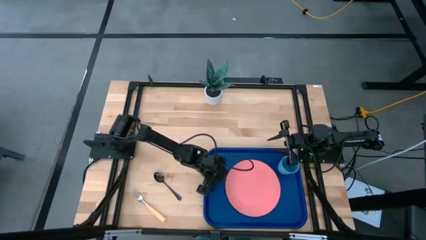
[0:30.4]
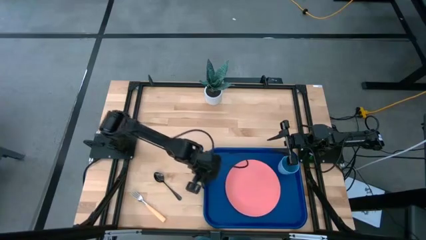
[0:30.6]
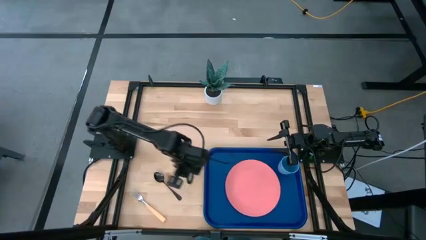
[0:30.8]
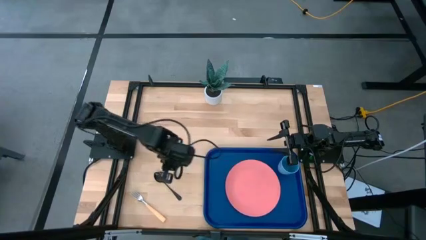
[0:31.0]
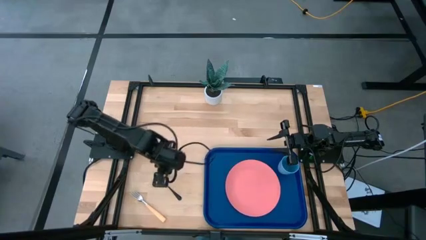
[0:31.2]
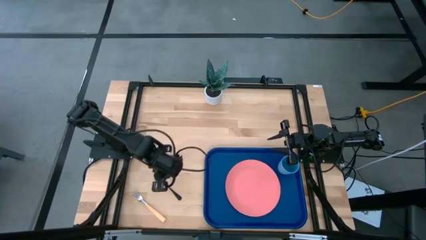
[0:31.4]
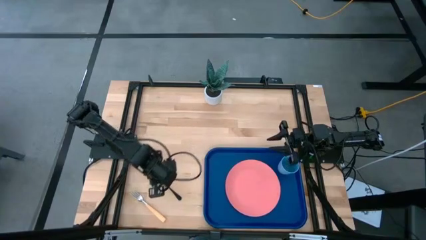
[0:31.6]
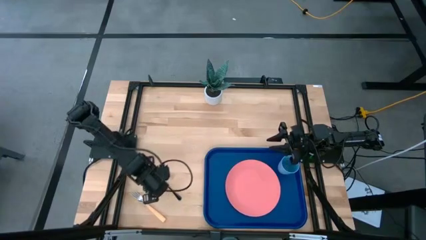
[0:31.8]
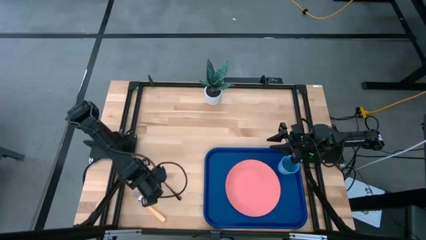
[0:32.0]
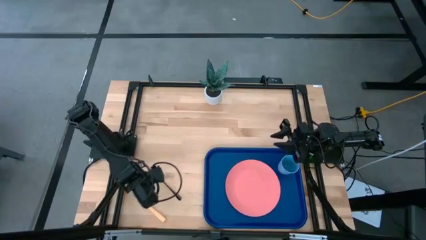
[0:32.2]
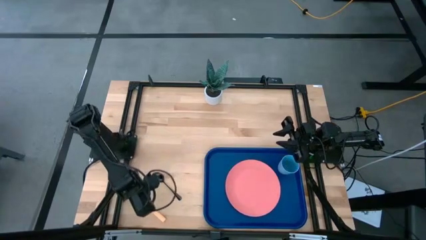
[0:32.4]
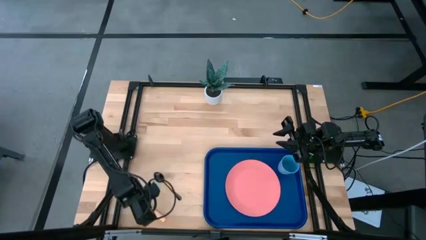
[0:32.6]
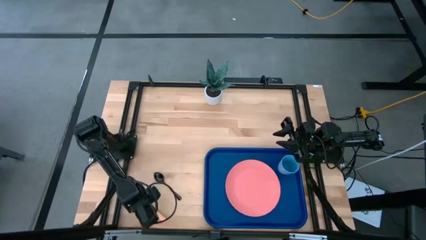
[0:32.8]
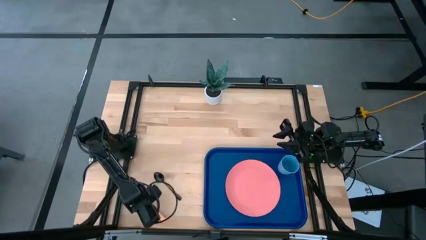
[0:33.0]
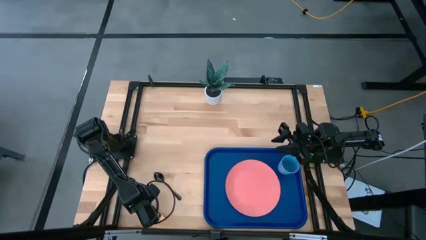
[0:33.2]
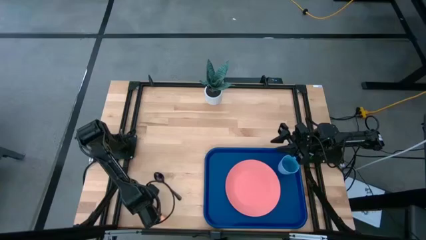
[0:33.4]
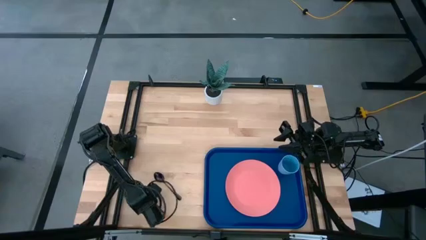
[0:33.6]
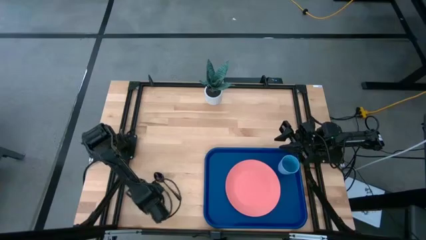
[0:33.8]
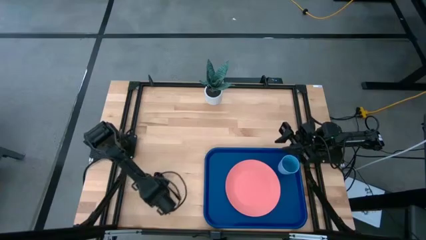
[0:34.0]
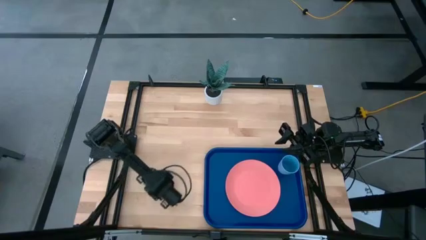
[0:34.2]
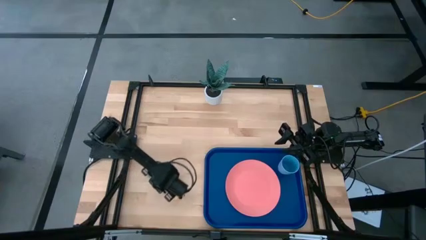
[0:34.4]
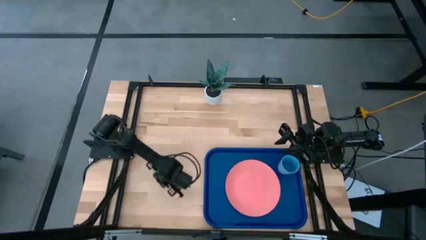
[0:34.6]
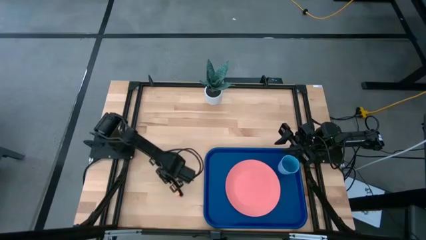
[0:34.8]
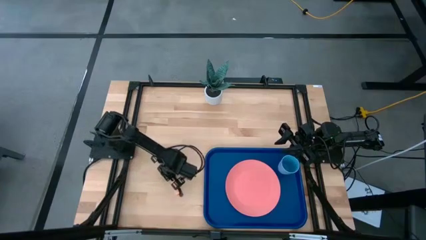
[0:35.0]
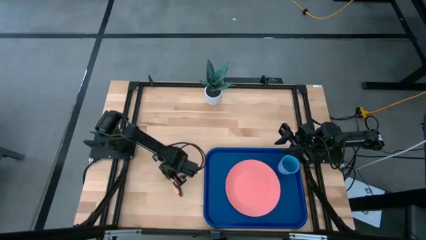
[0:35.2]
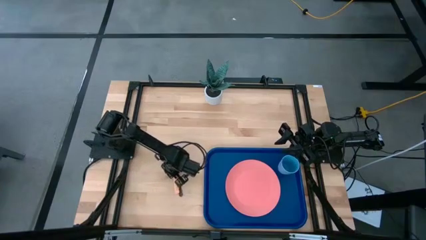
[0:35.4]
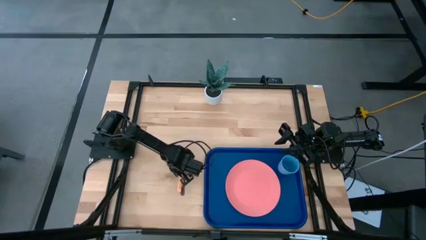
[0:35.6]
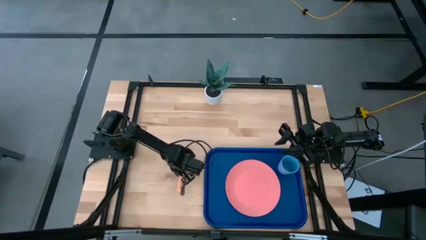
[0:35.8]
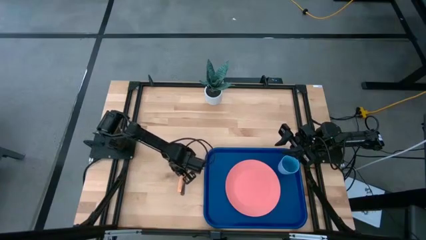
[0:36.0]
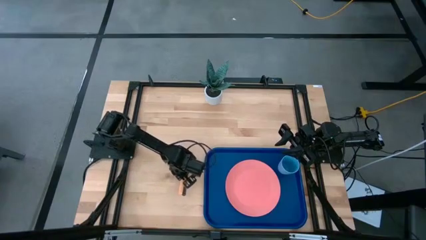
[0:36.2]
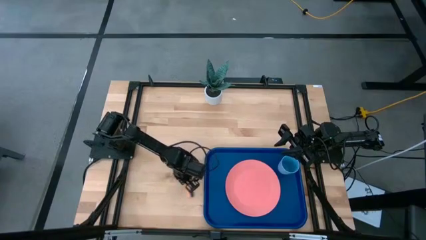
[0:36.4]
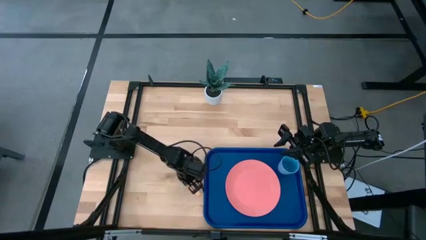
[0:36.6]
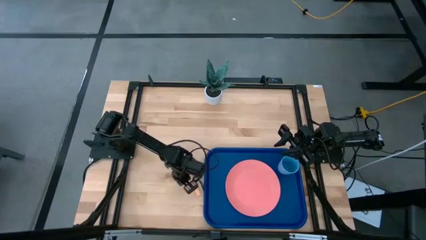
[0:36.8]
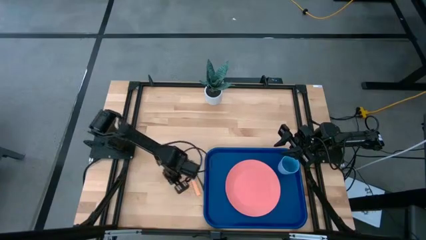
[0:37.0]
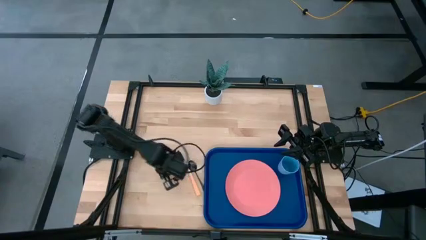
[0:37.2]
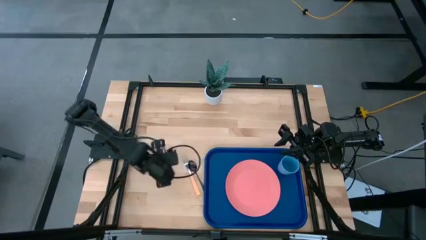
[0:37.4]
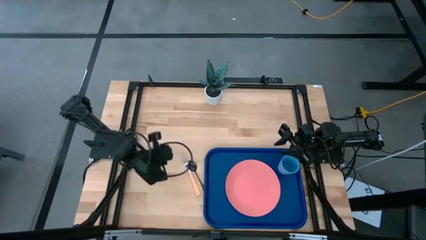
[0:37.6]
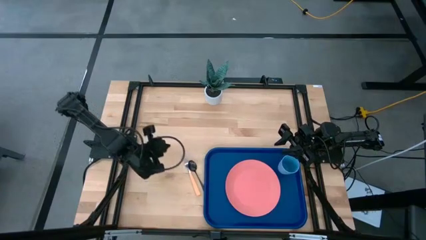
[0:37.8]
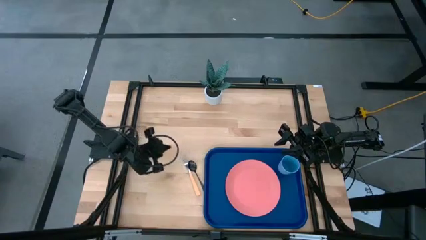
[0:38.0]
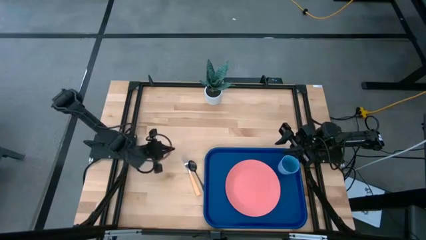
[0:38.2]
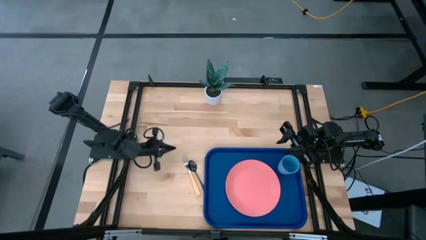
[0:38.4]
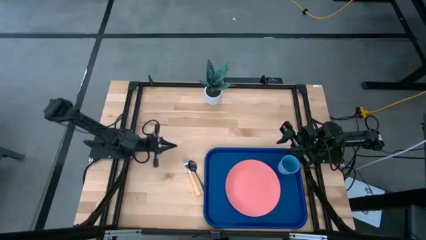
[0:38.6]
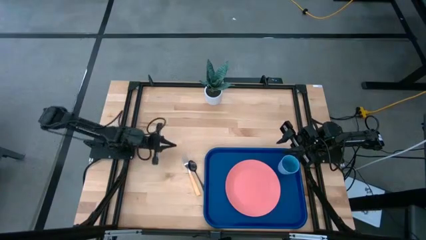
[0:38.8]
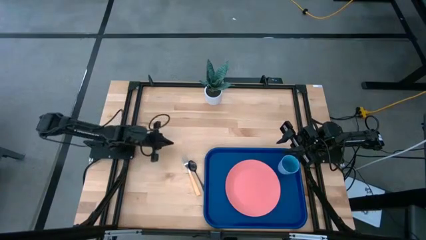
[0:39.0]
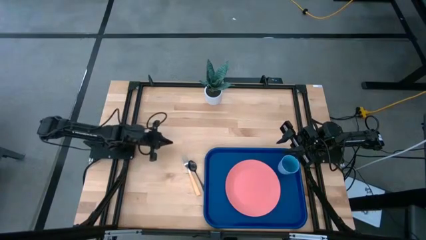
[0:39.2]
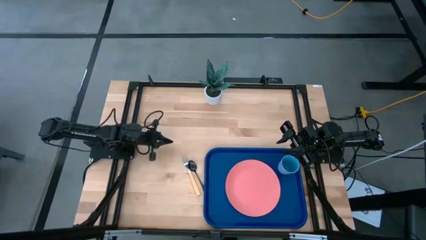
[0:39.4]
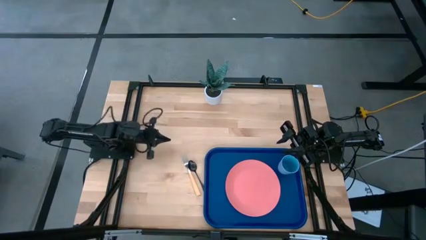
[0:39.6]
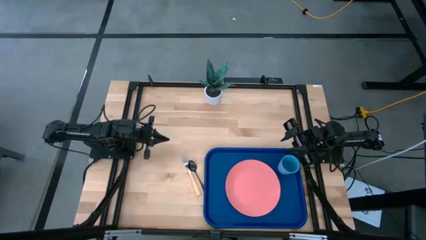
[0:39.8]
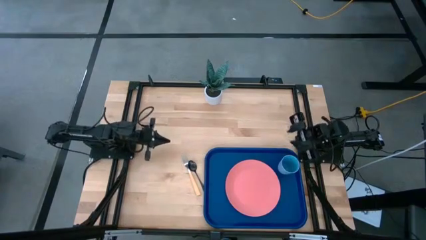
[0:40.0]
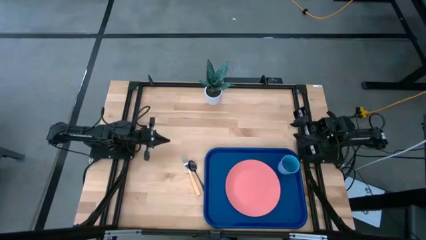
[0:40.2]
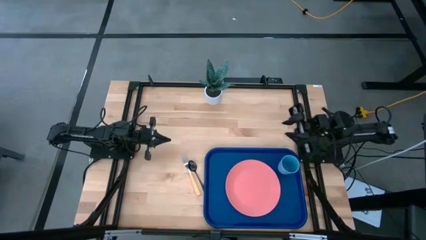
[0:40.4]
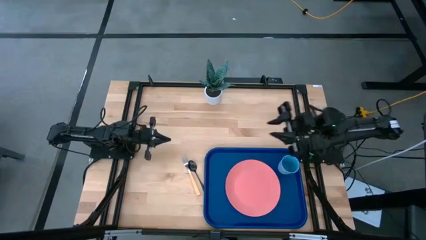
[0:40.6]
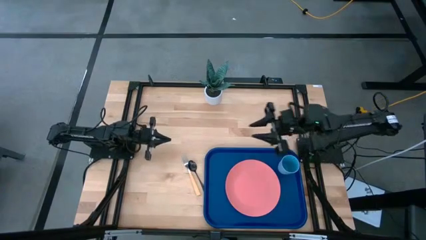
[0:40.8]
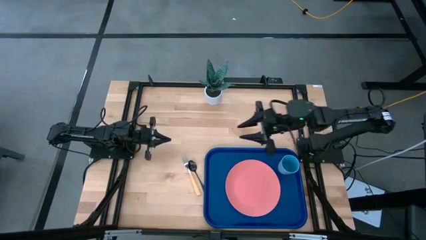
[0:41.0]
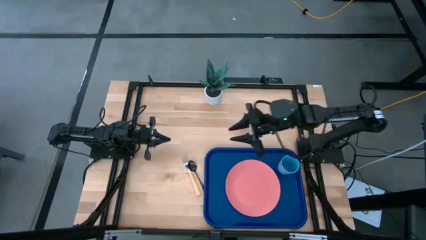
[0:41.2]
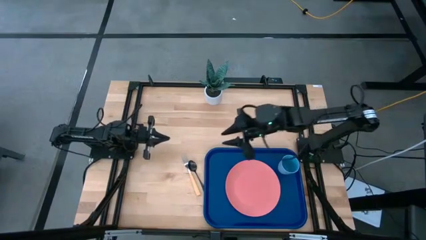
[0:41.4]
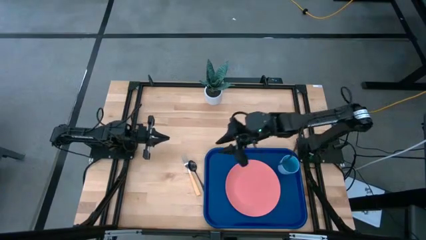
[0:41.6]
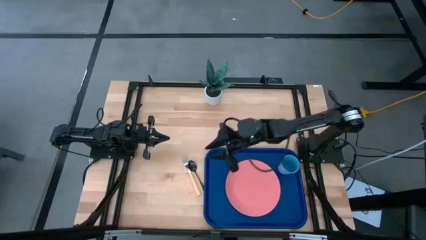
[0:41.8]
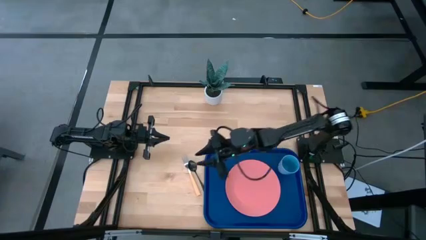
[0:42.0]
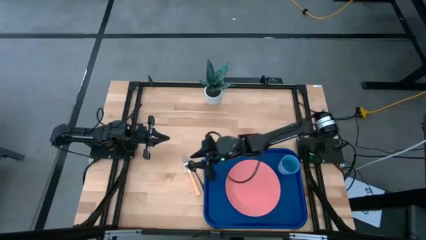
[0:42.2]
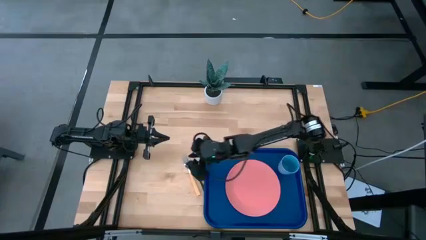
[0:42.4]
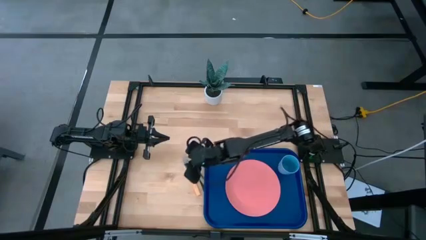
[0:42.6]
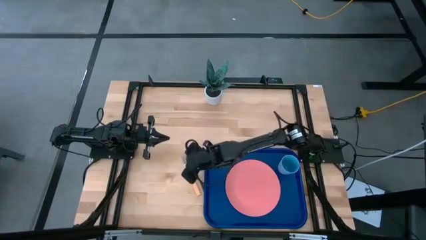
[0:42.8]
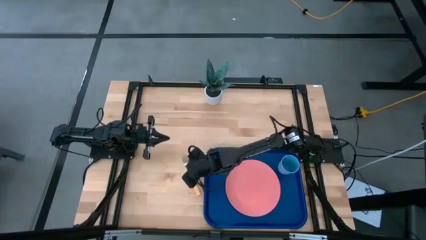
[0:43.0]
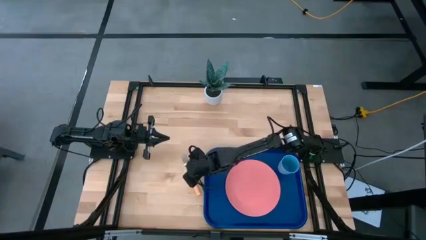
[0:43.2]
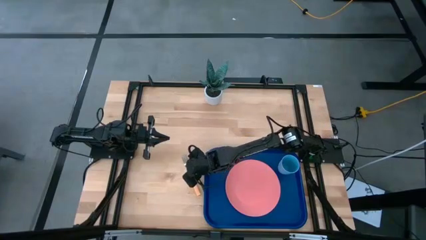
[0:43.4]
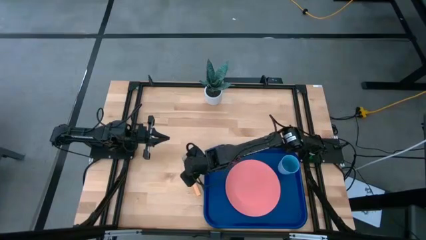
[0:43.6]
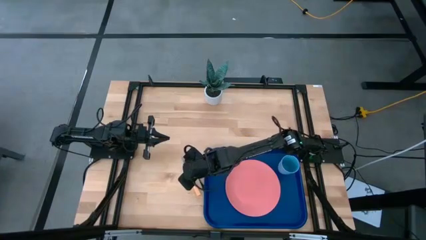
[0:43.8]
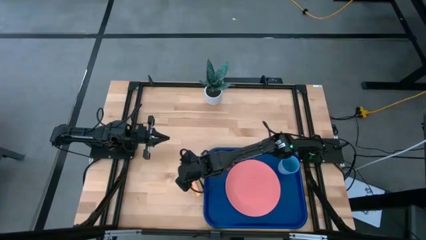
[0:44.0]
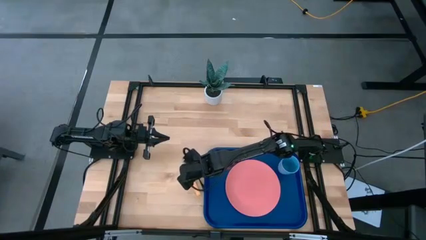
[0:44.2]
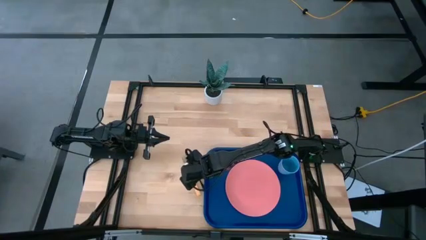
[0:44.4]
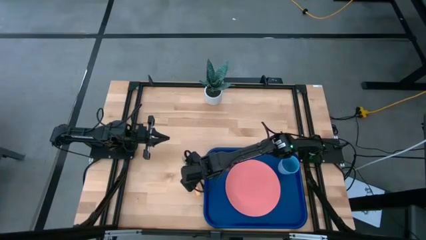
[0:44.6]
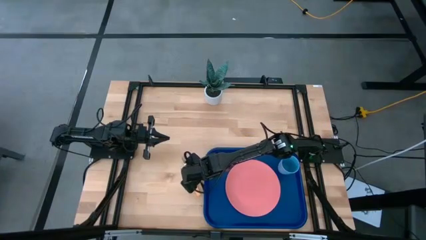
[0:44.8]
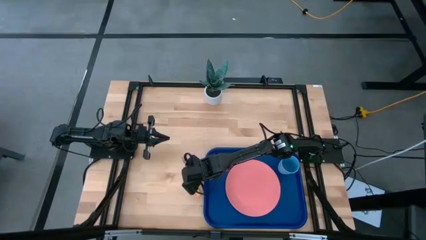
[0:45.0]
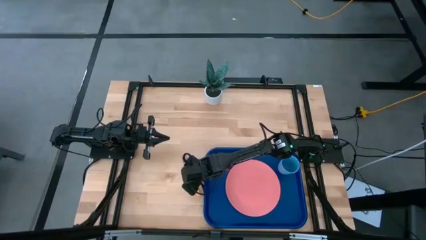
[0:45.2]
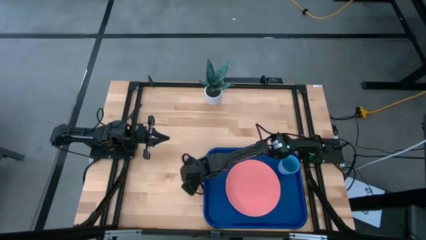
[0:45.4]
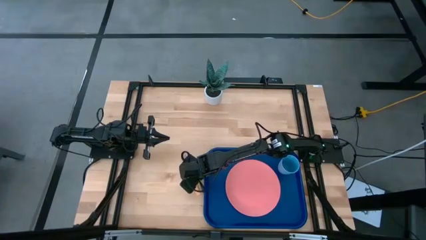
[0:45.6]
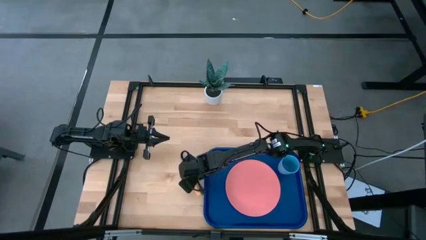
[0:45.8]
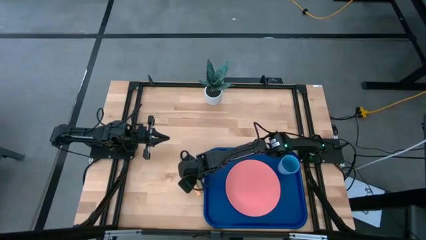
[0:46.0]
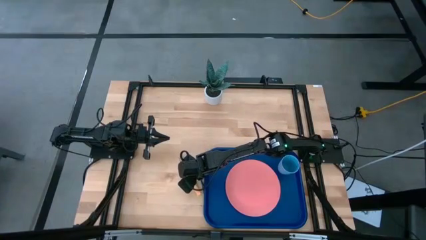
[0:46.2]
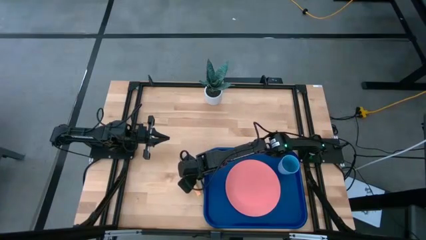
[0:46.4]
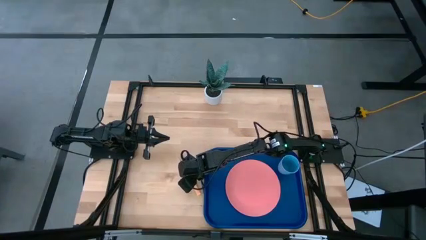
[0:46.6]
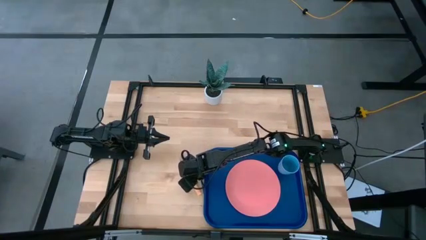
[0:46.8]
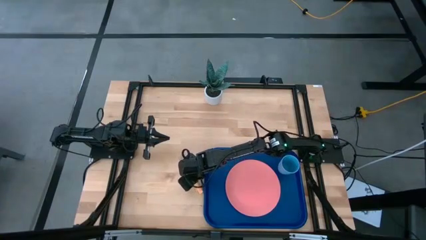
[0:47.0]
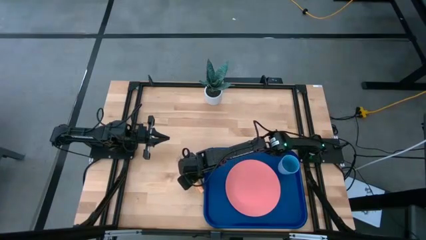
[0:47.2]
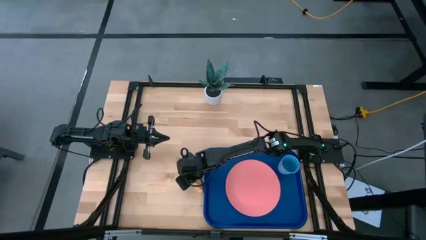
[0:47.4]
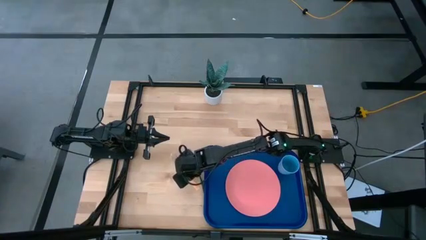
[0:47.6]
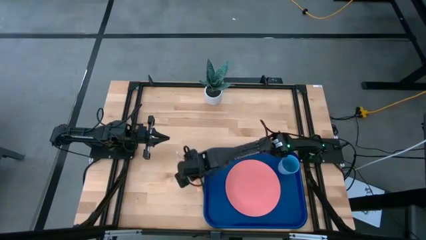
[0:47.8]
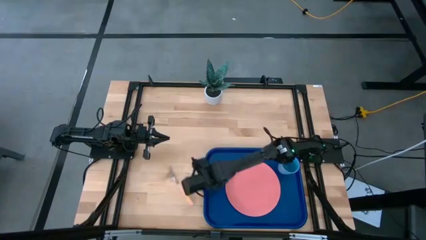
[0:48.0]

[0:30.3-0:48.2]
Task: Pick and place plate/cup/fork/spoon on tray
Adjust the fork and spoon
